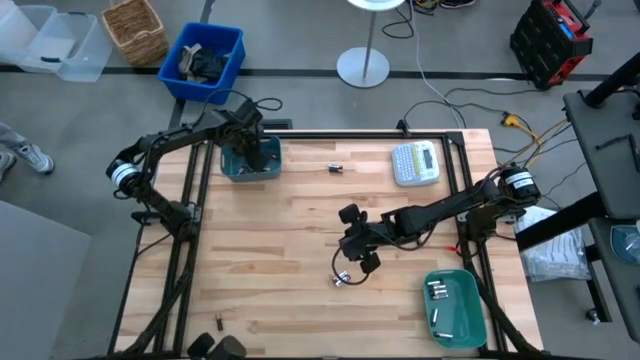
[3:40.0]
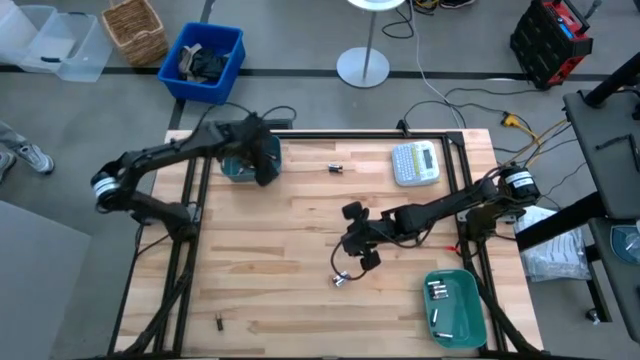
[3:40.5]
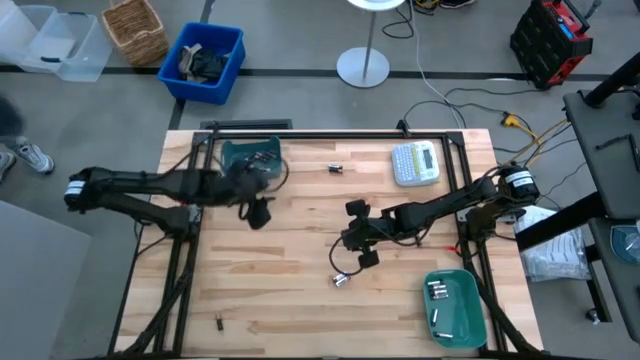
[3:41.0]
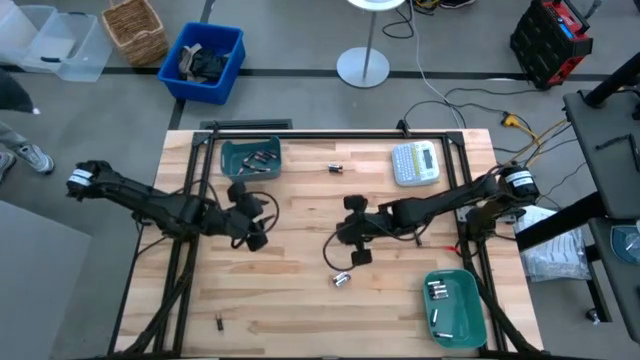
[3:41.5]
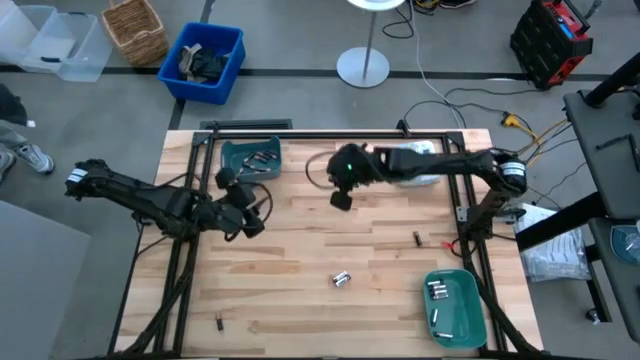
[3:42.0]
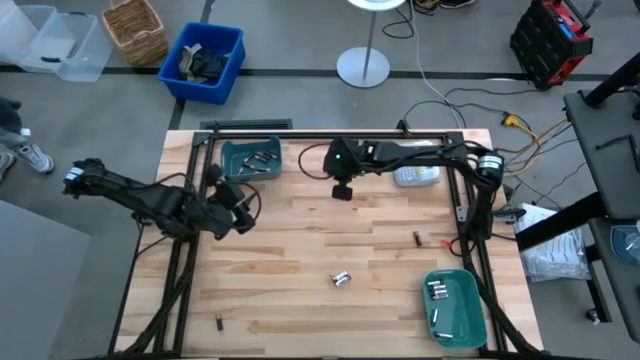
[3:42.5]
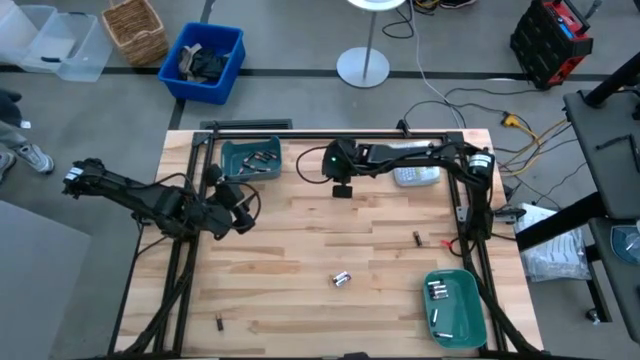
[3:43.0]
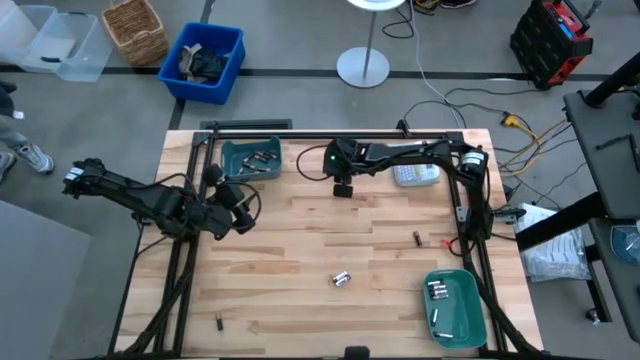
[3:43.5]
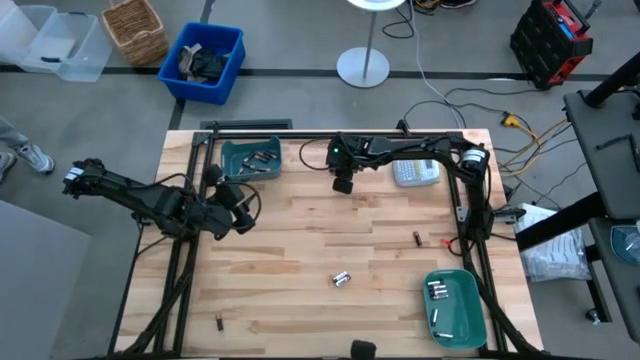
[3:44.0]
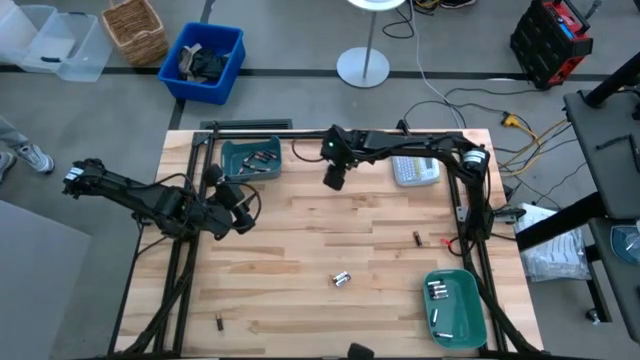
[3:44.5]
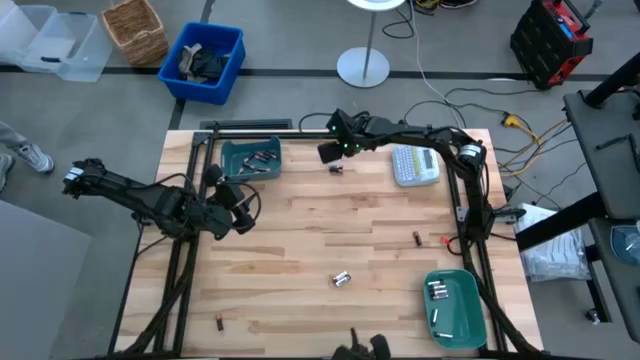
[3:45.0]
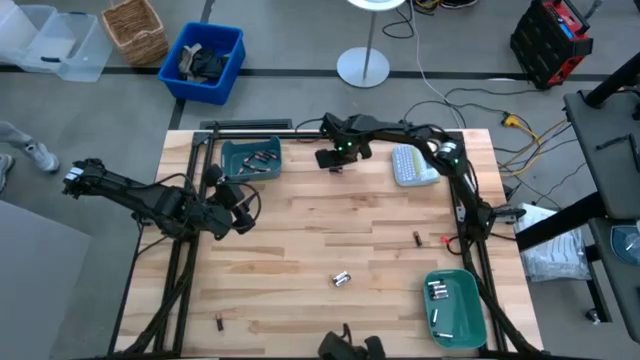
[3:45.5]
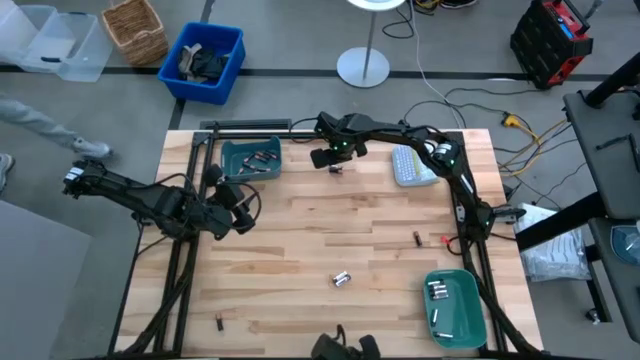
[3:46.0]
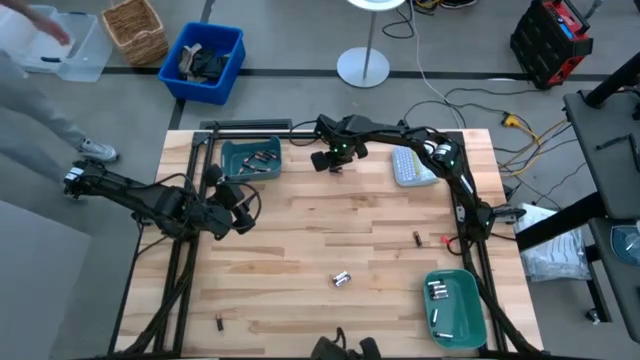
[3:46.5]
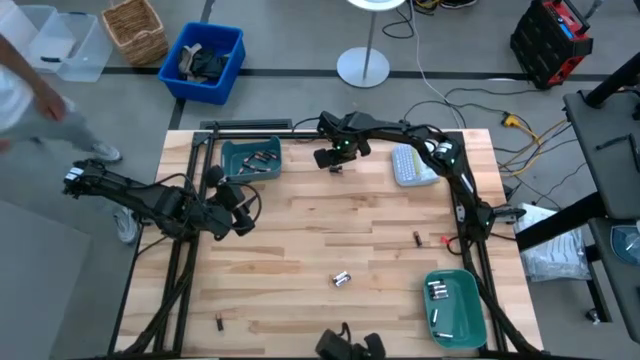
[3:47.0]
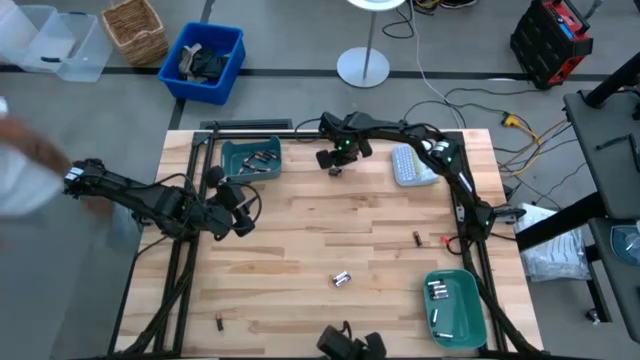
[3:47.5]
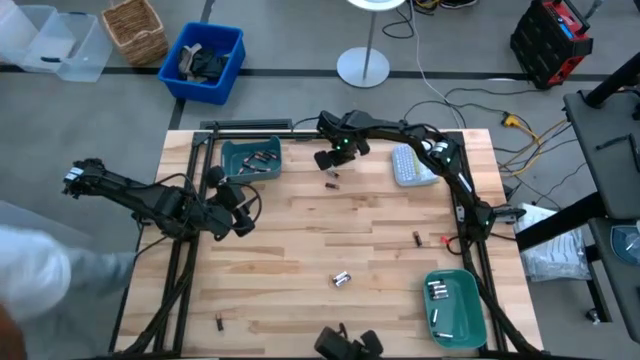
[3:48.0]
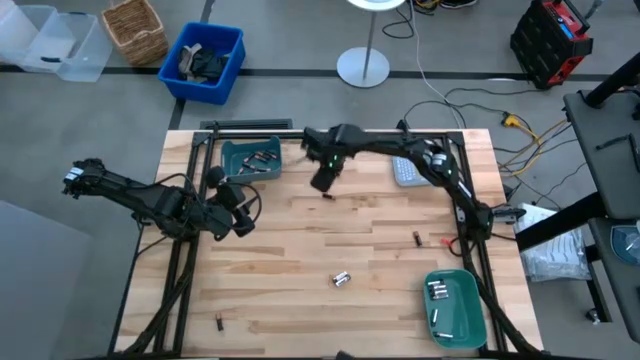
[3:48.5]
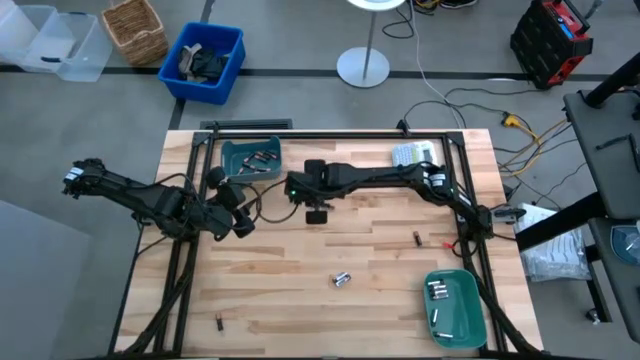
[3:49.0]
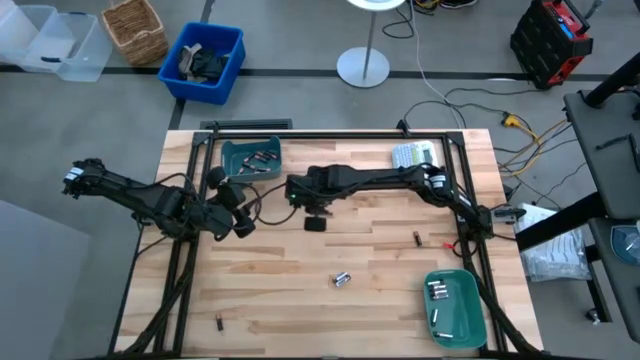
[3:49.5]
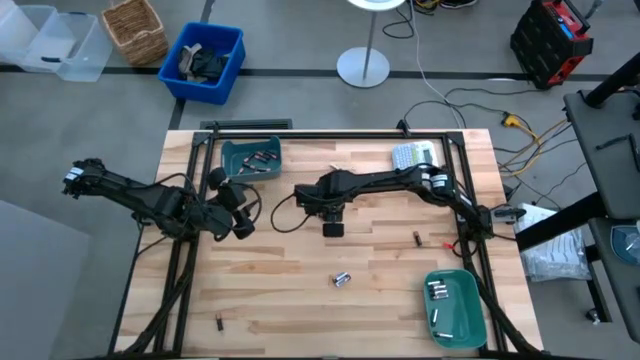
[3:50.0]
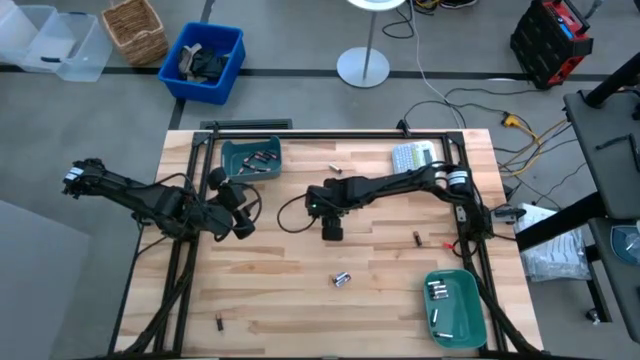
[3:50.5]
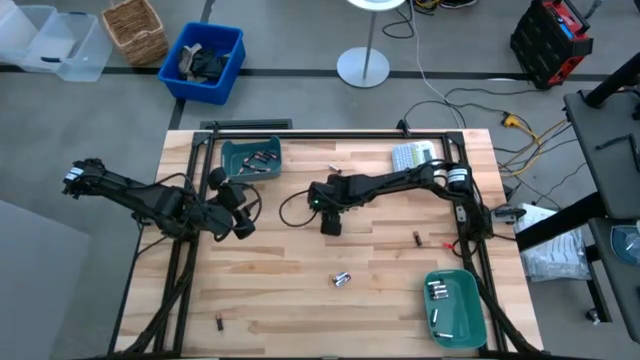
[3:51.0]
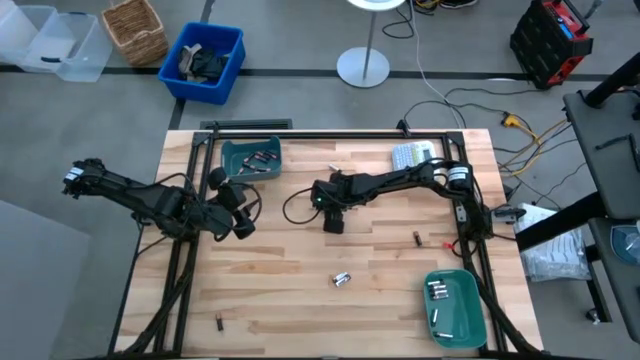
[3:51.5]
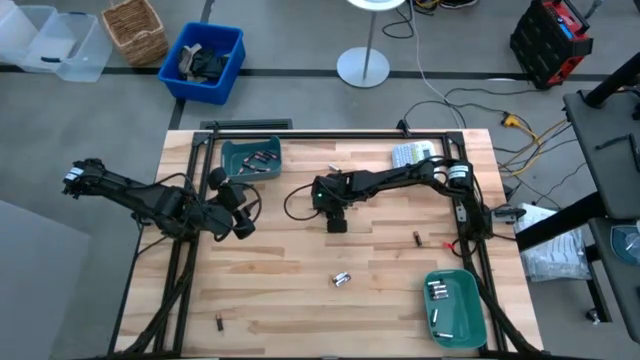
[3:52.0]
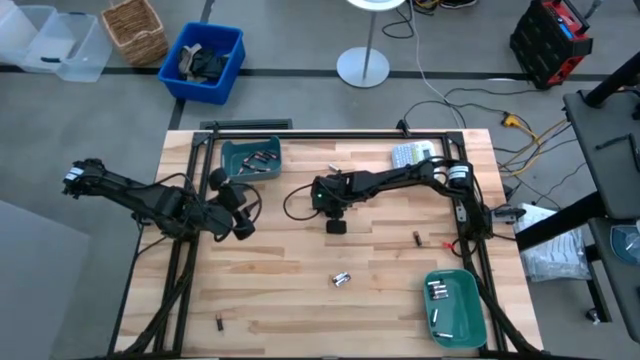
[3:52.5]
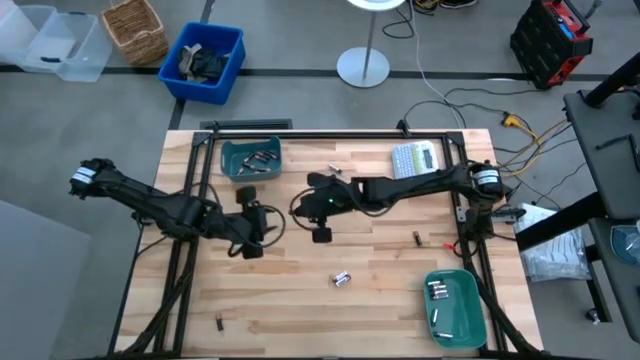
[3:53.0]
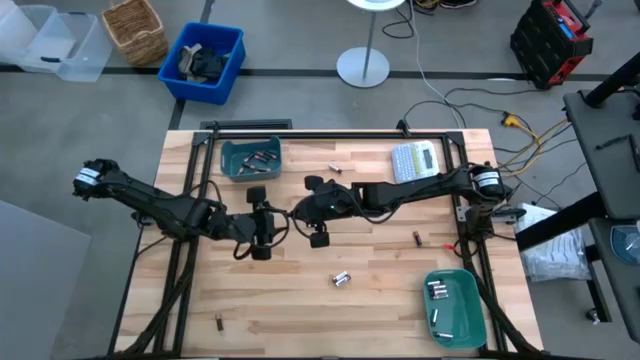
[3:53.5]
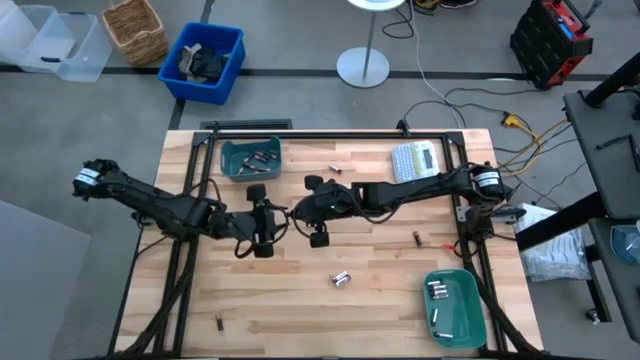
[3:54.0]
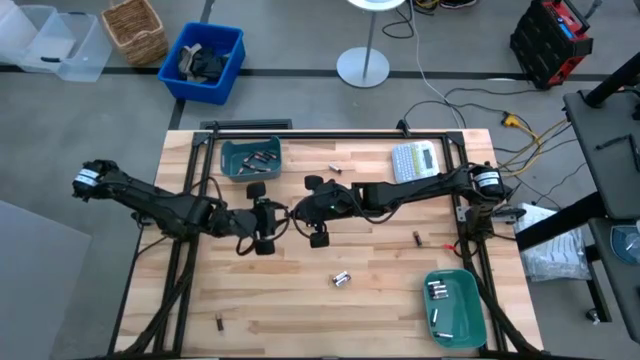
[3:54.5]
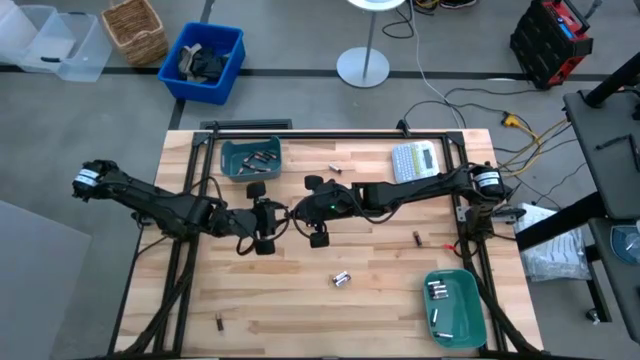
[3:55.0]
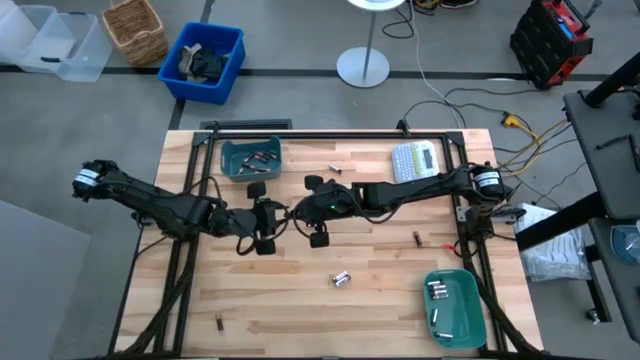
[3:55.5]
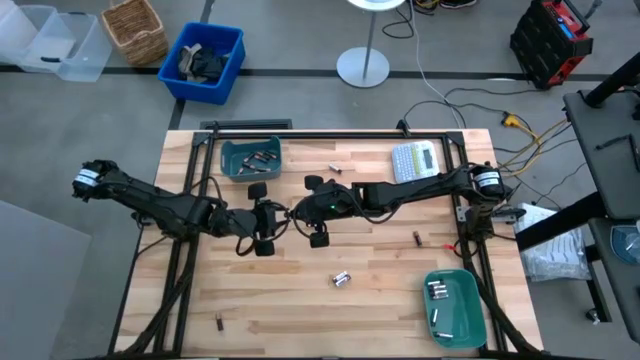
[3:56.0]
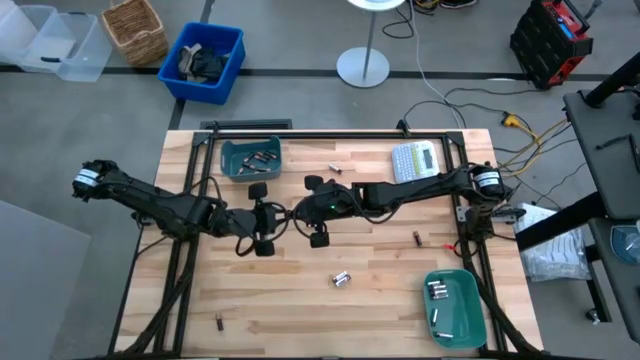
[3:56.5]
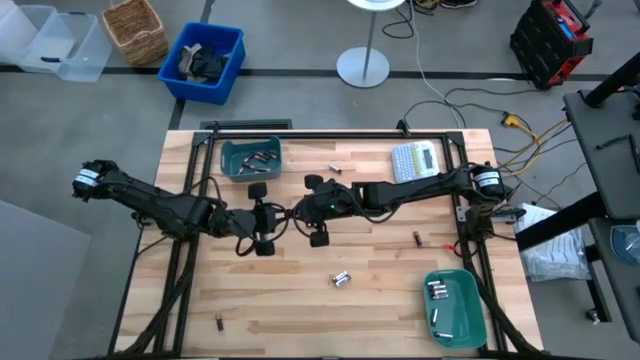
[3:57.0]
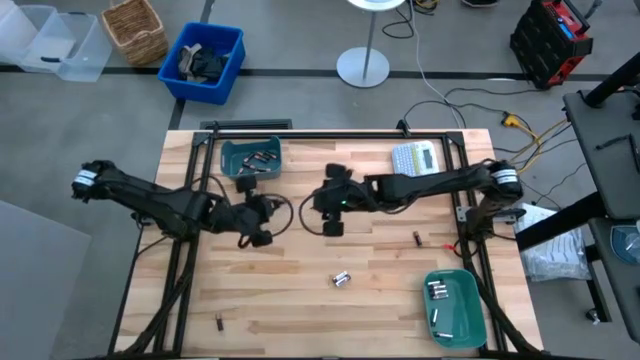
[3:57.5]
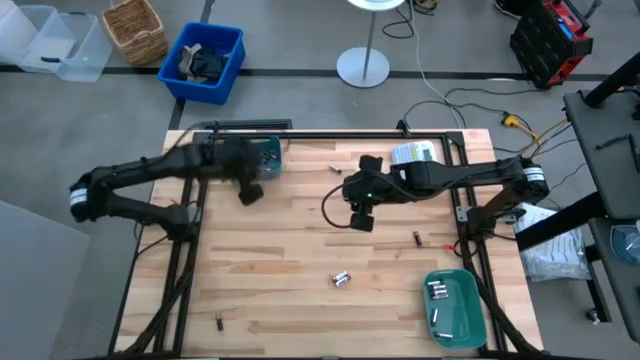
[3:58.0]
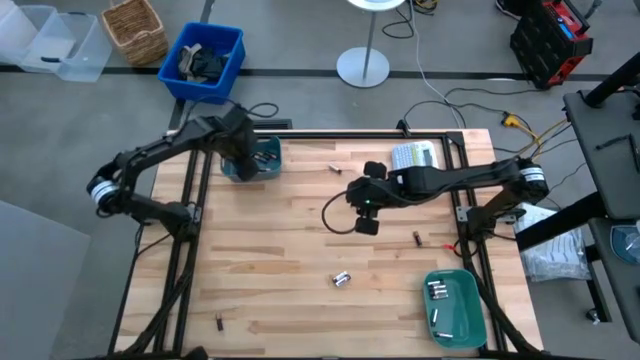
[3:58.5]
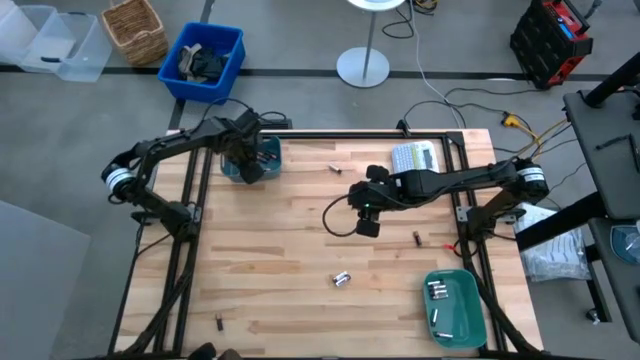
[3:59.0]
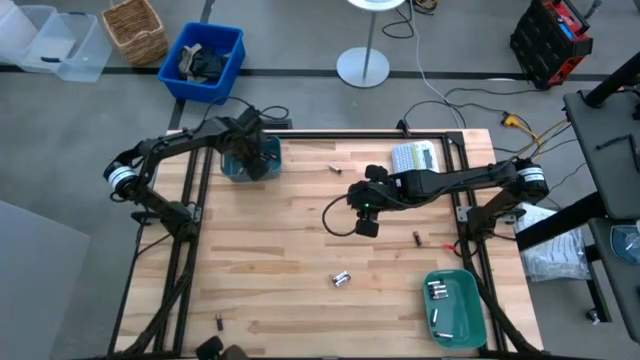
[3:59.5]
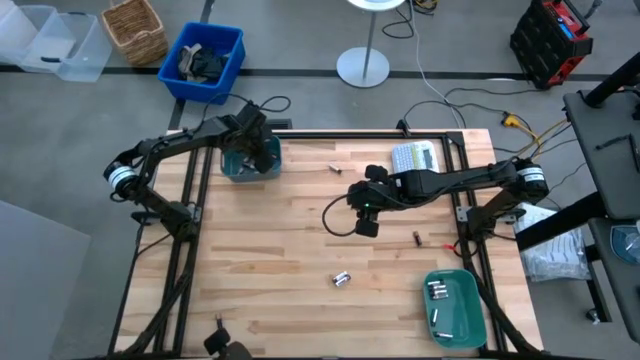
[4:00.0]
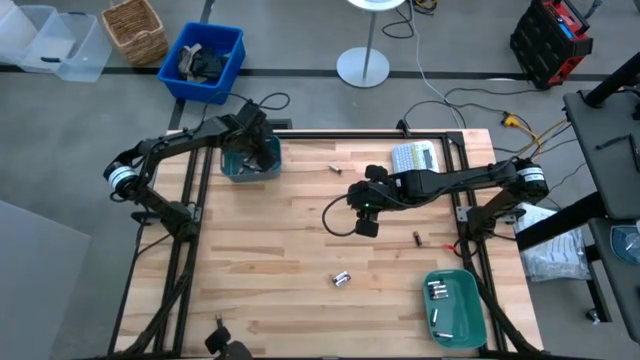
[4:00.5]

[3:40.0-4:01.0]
Task: Sort batteries
Put the black battery into the blue bin
